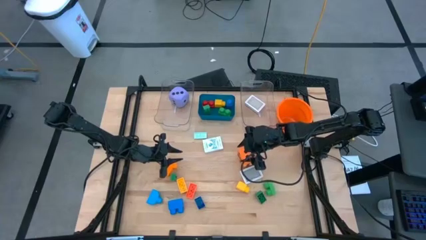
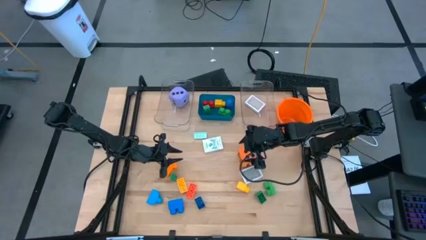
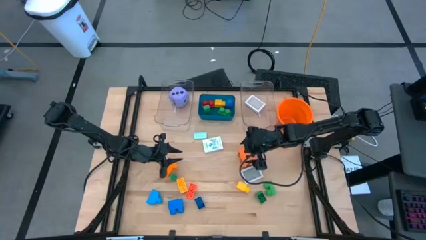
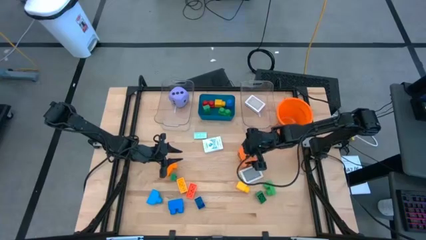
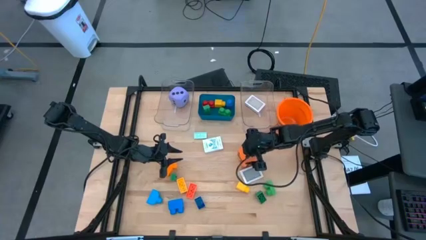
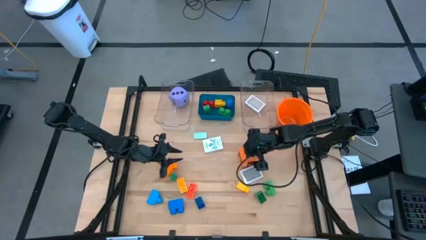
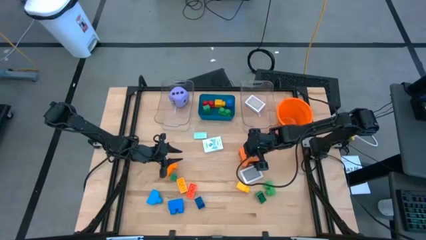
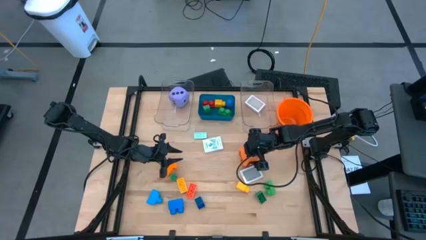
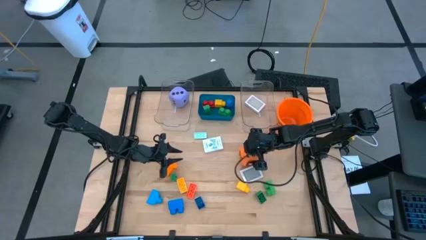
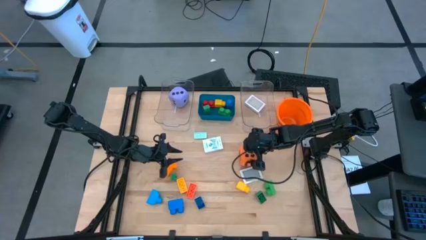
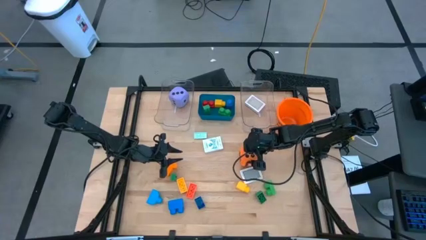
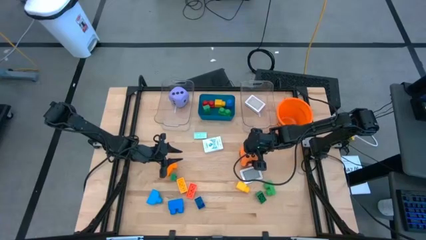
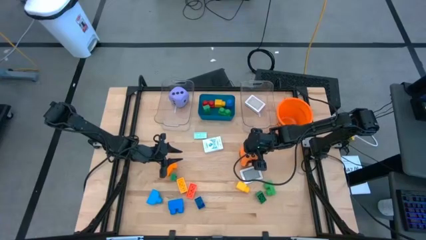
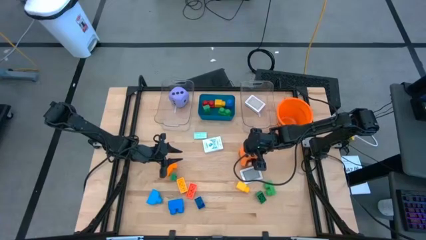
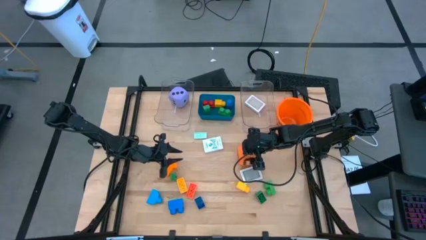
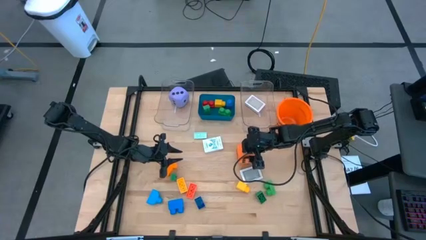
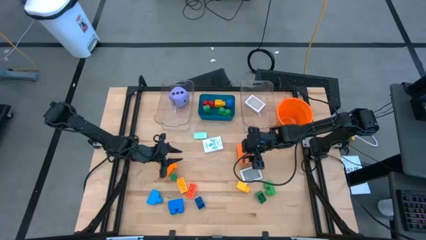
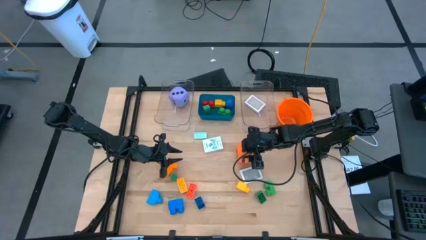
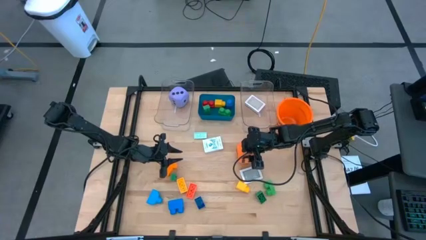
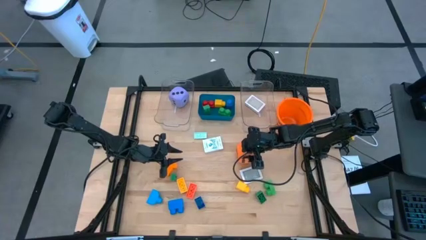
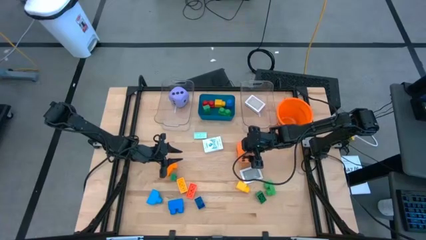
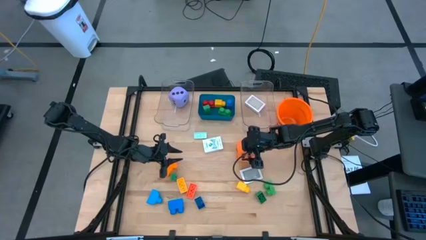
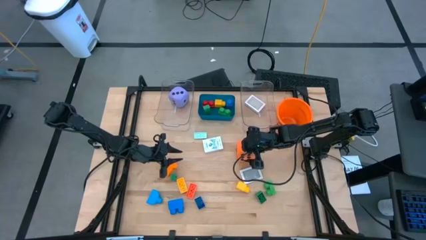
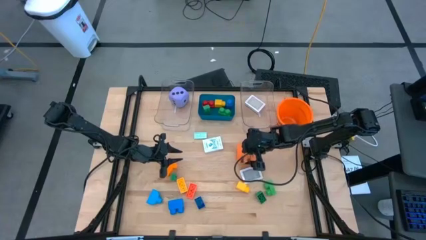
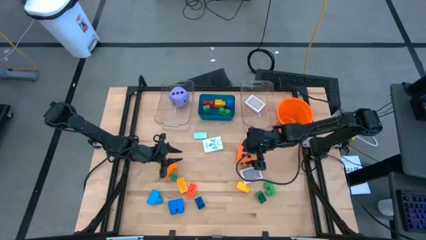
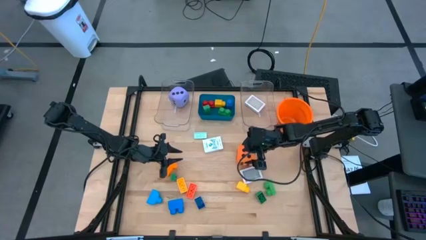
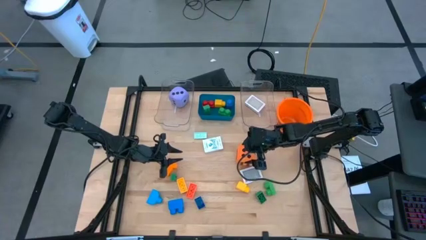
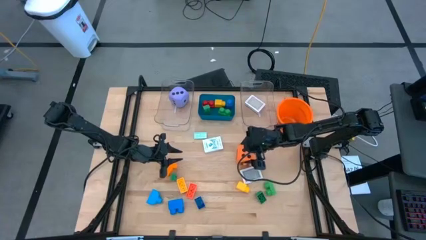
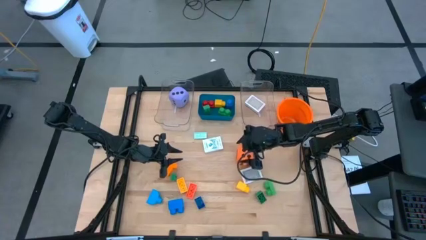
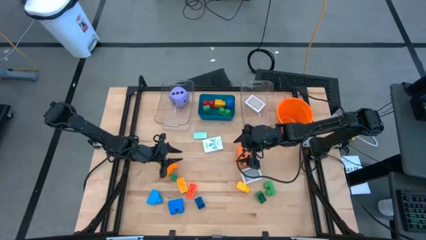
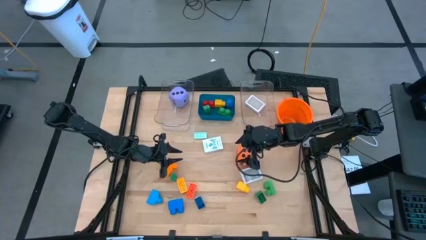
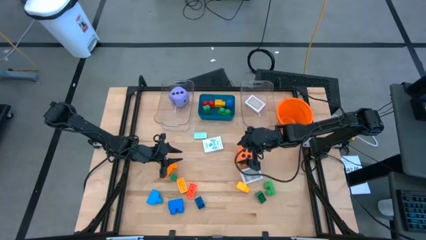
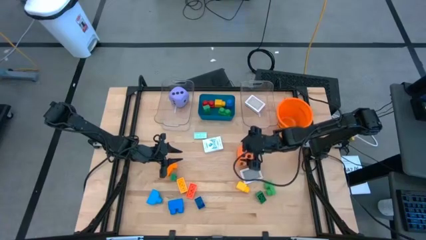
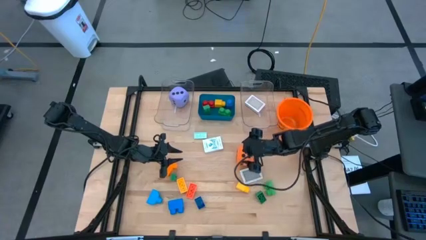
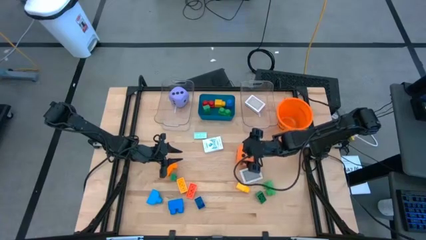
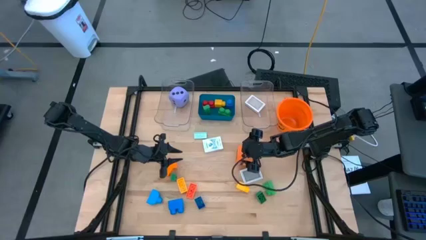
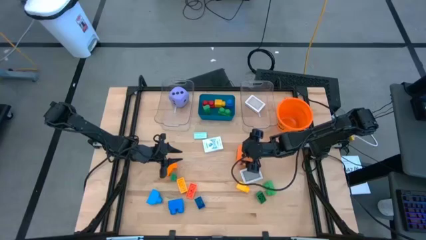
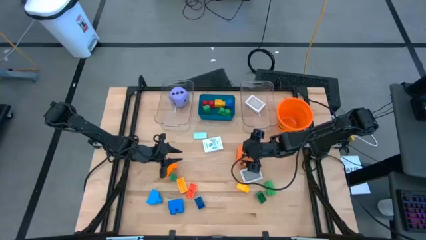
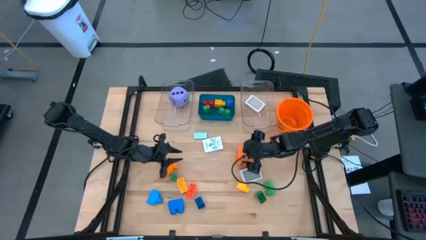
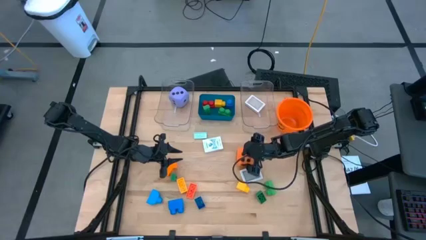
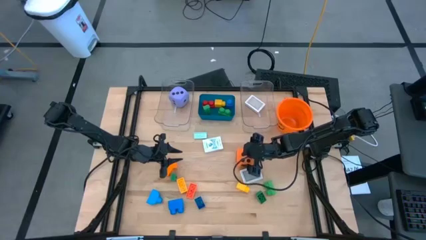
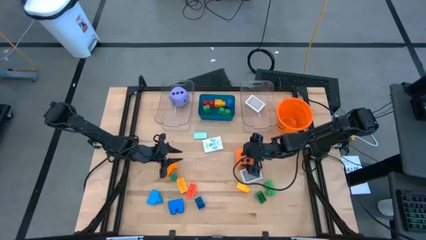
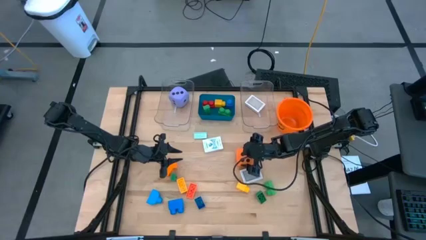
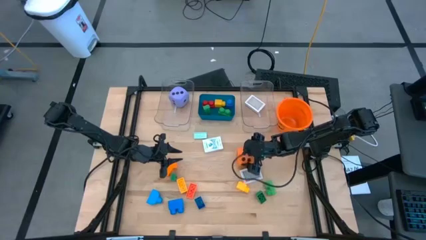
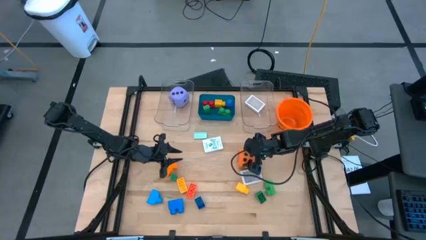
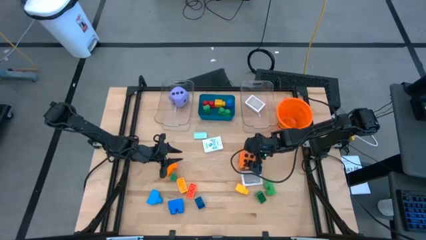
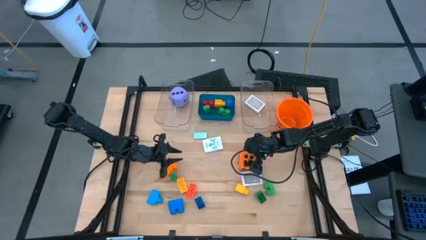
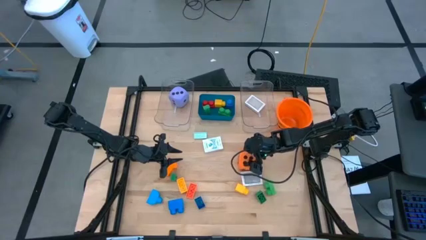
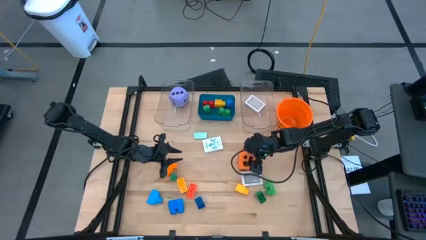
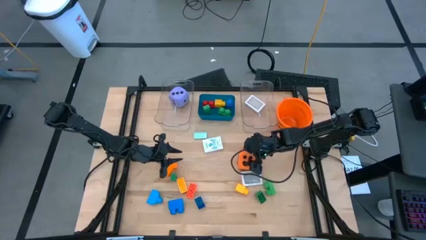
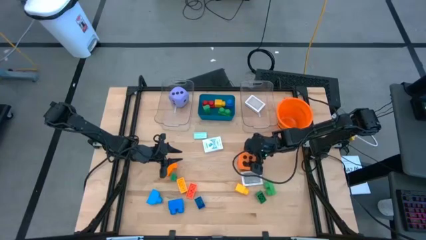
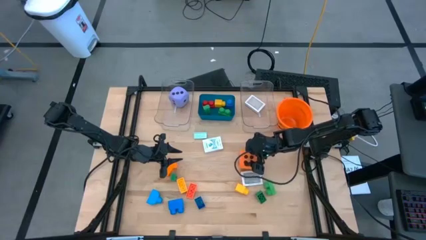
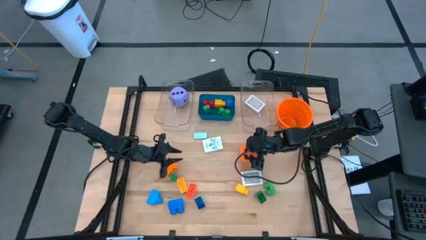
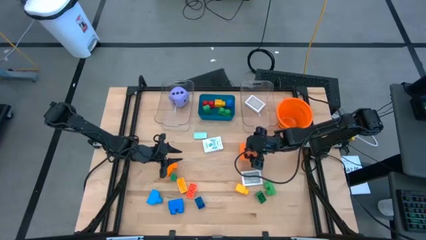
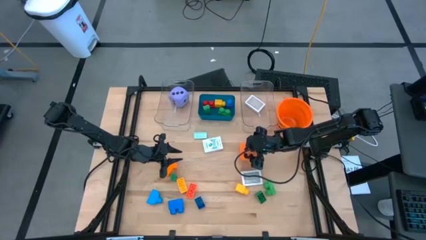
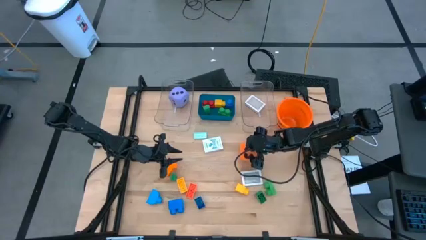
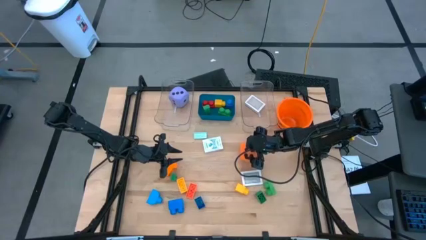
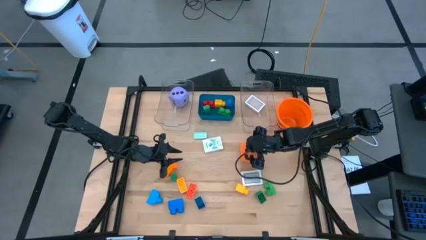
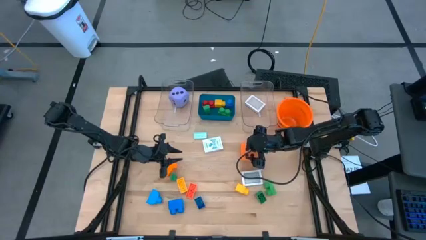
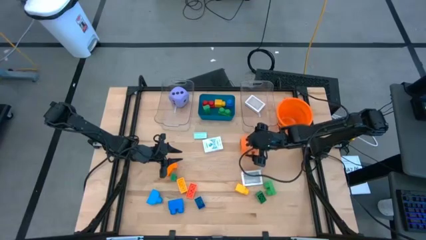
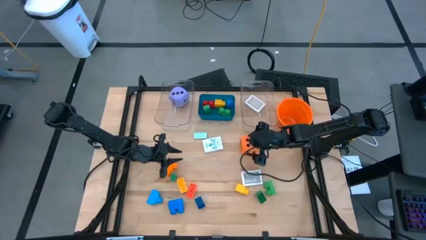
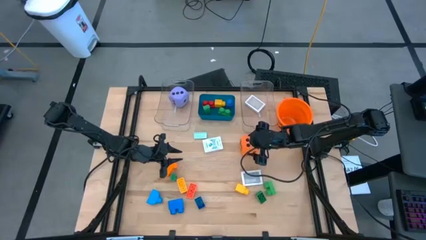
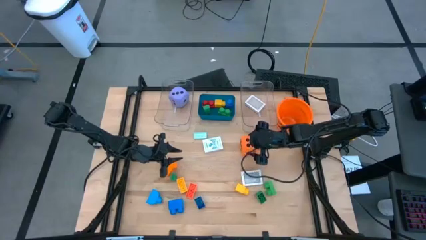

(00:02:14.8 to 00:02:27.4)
Task: Pick & Place Toys
Put the orange dice into the left transparent bin

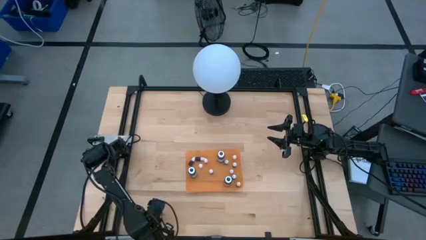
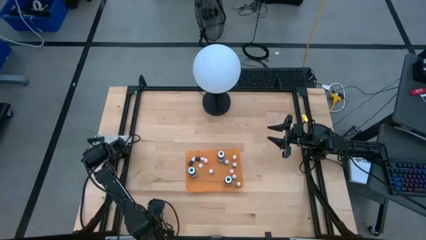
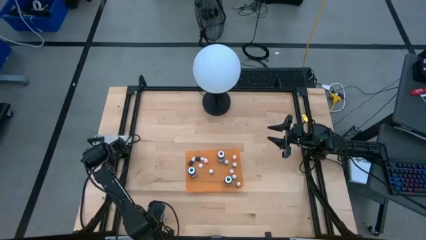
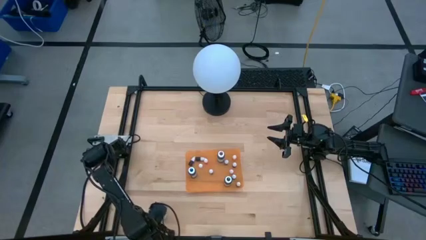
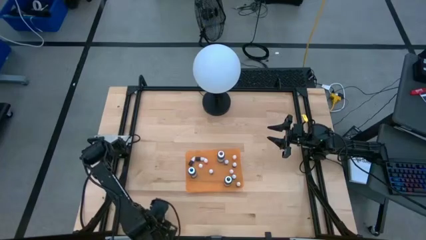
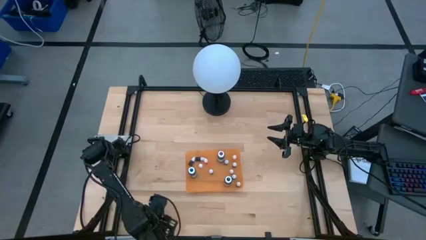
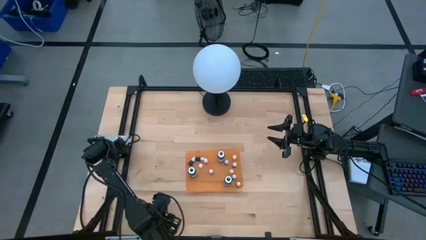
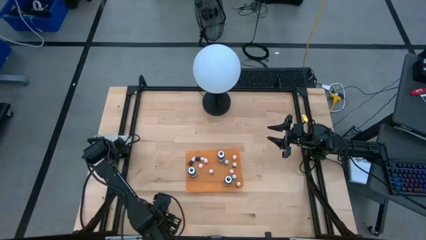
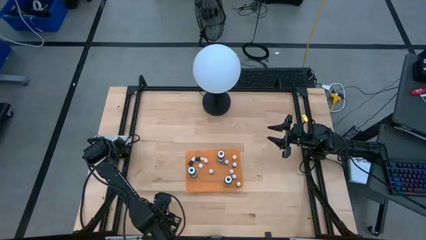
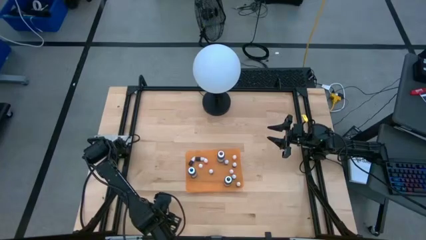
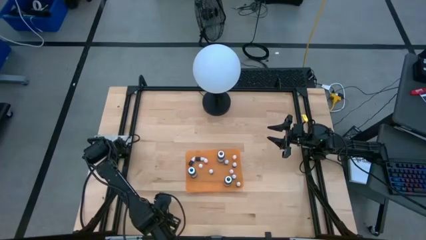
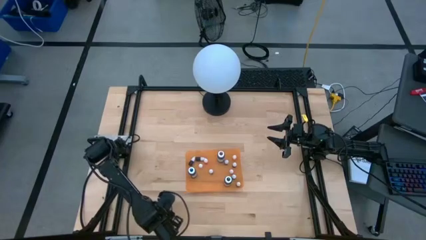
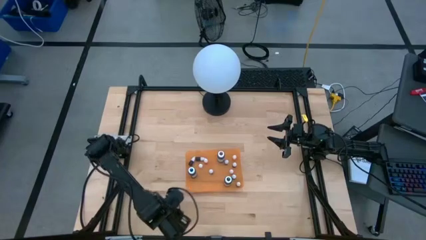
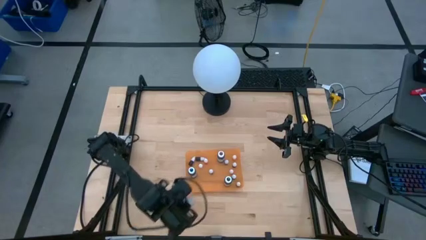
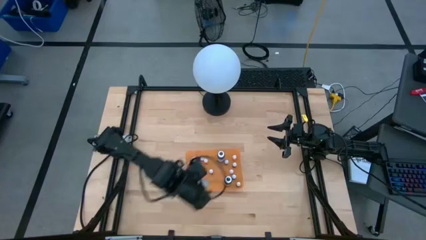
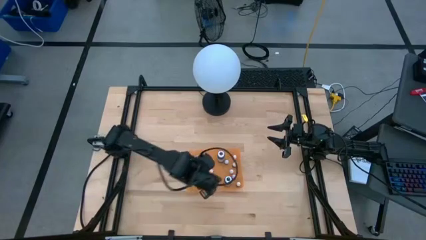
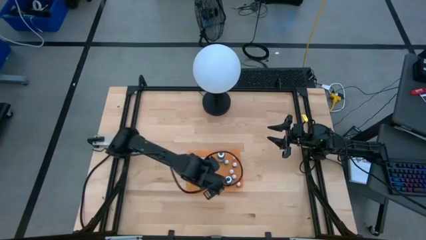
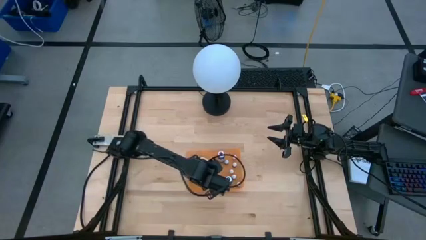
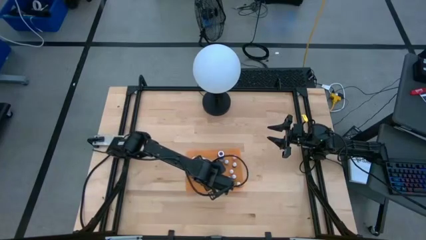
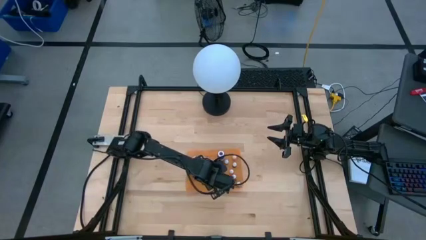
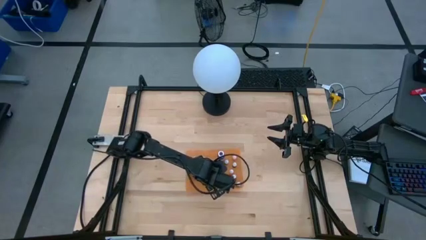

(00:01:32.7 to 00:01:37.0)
Task: Pick & Place food coloring
Put the large green food coloring bottle into the orange container
